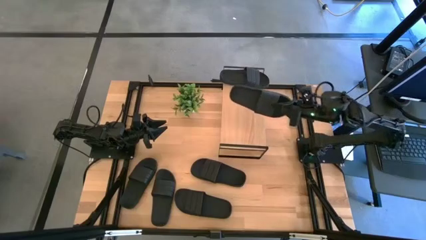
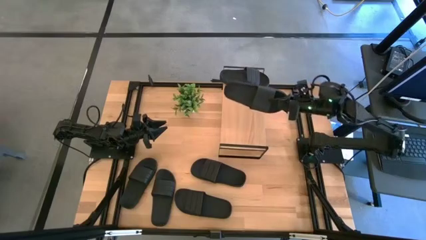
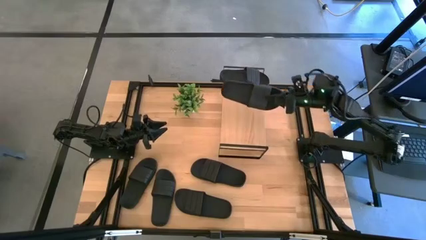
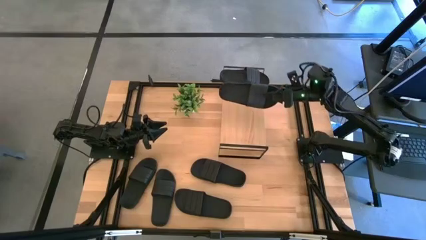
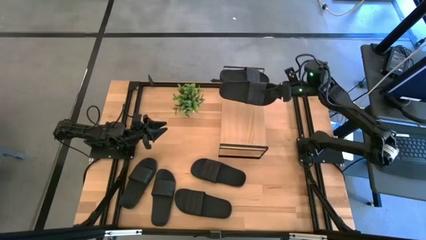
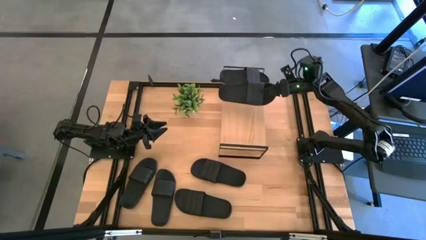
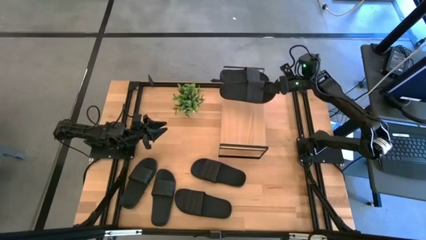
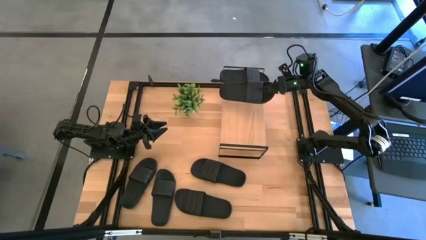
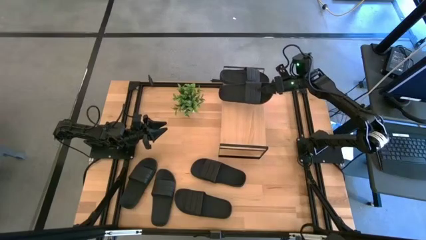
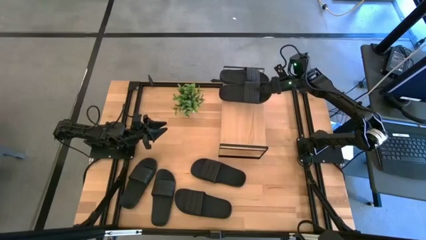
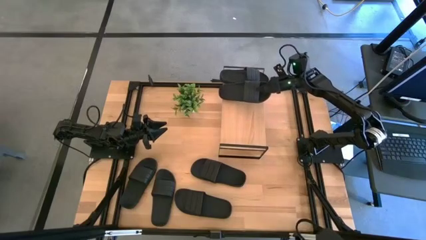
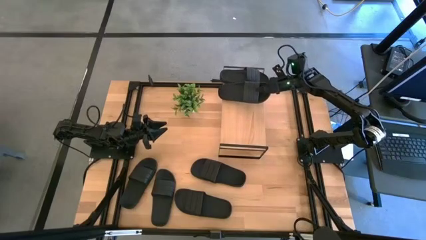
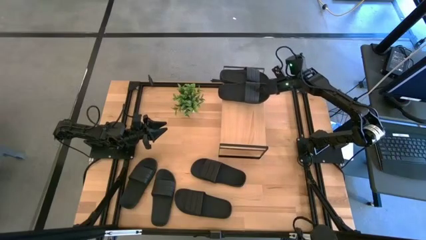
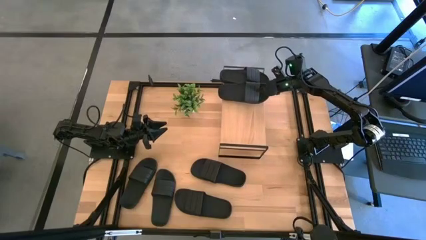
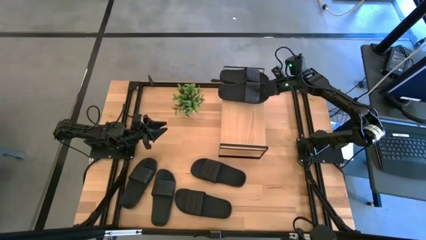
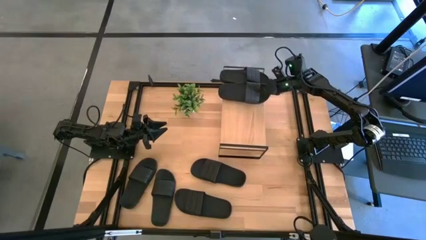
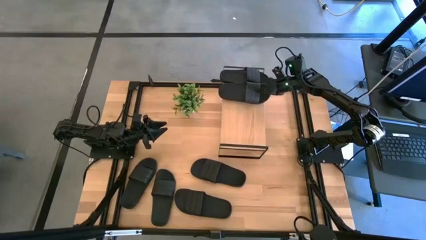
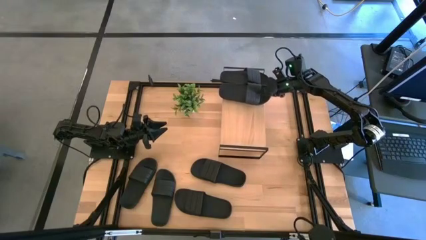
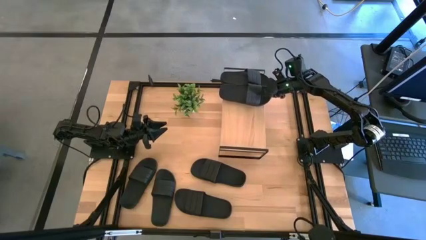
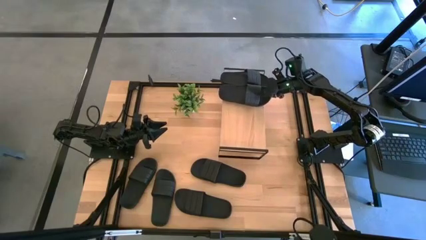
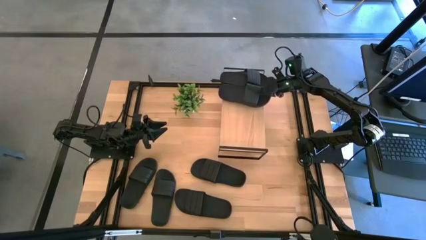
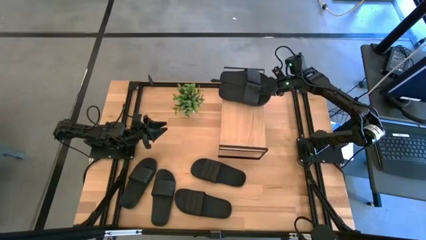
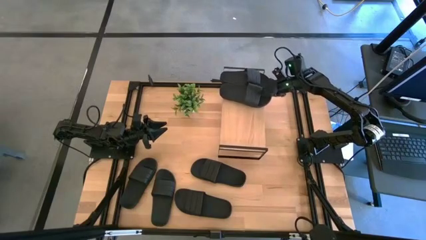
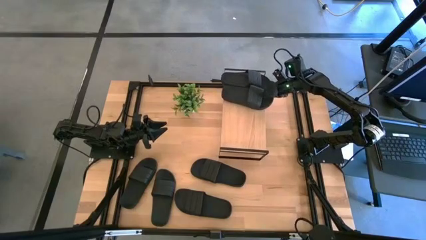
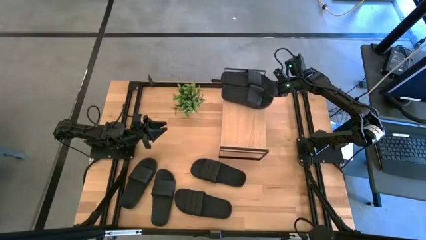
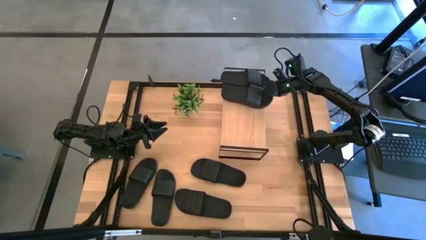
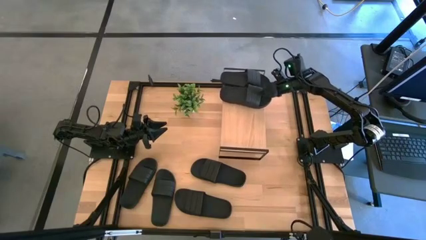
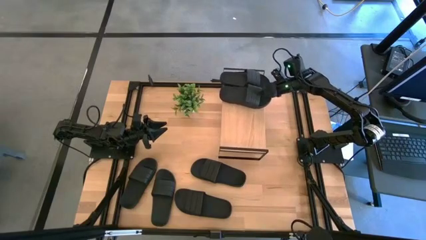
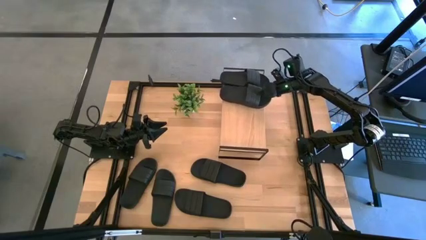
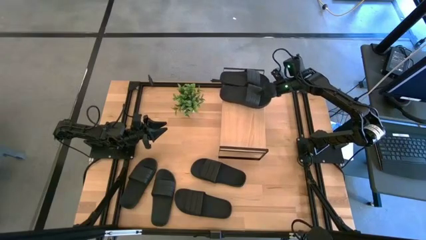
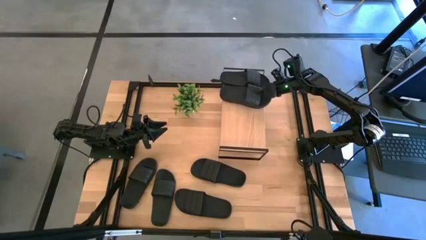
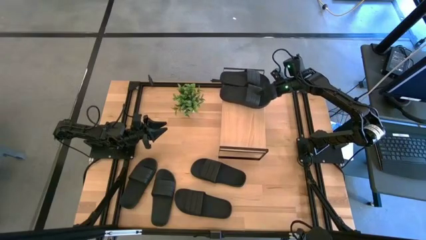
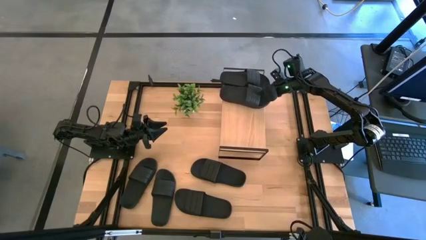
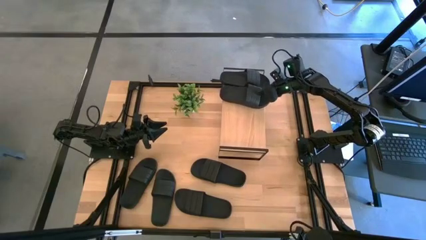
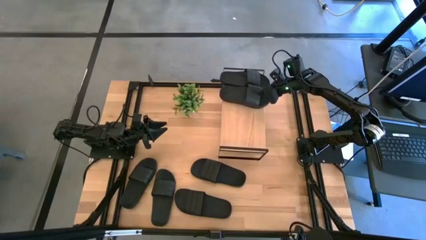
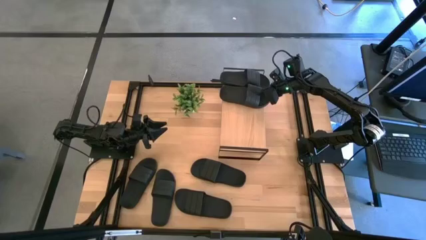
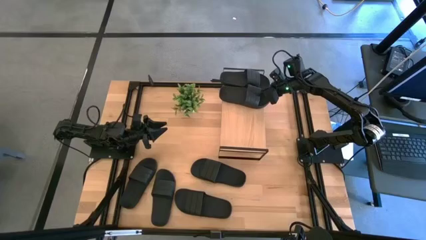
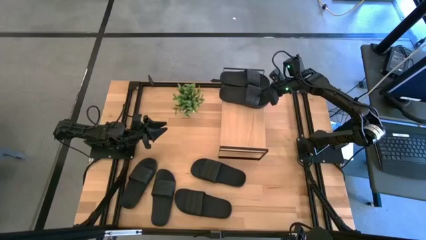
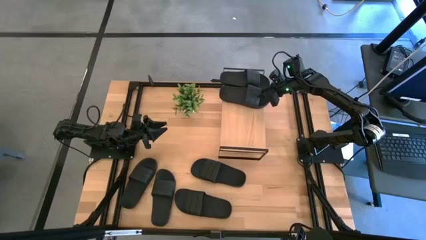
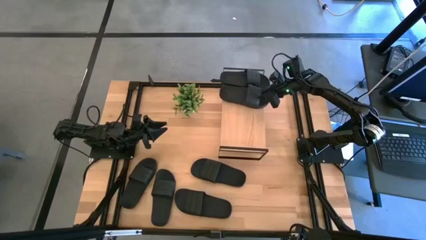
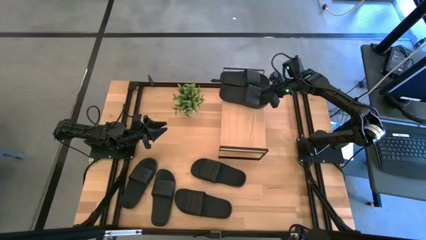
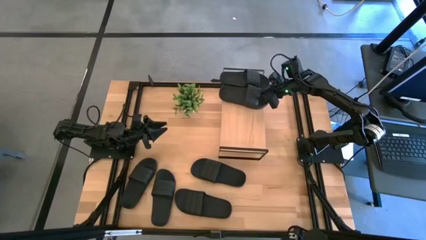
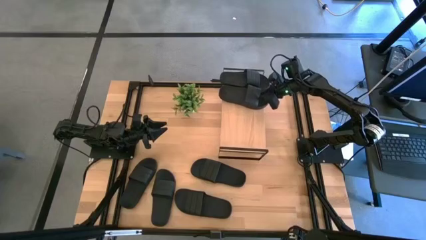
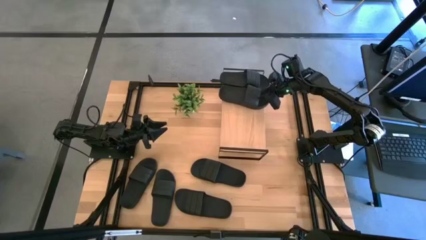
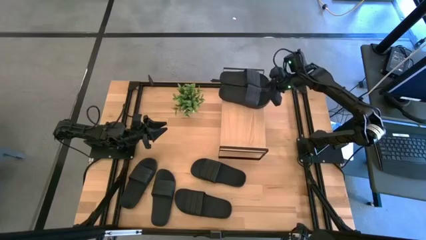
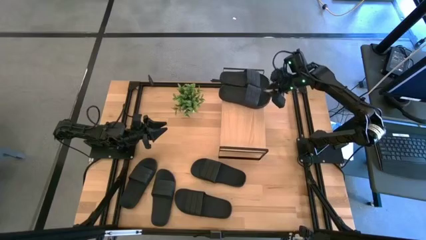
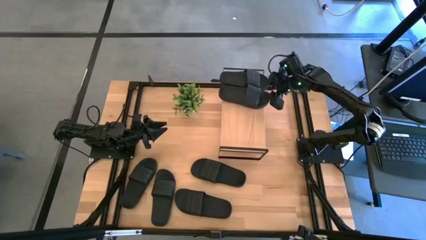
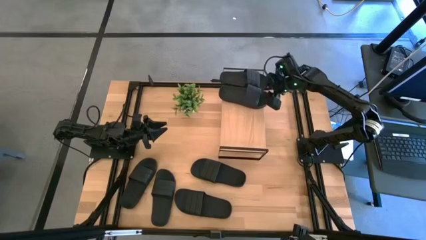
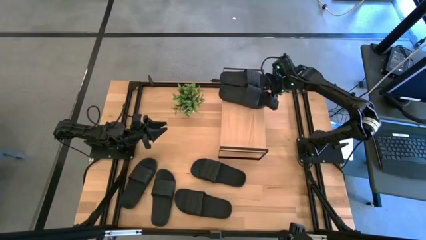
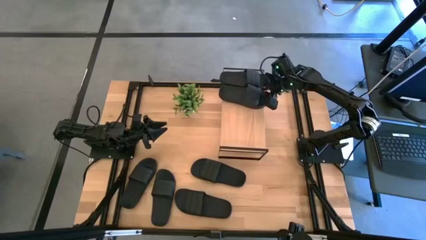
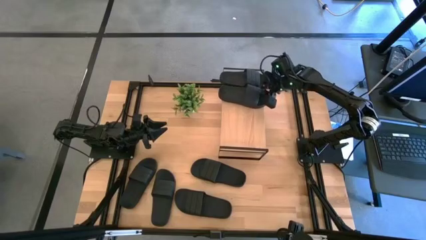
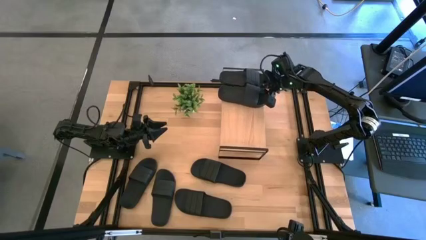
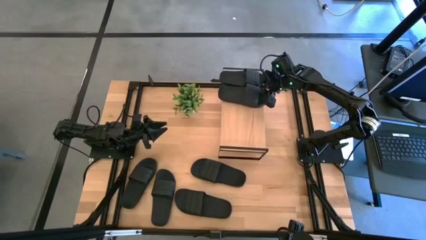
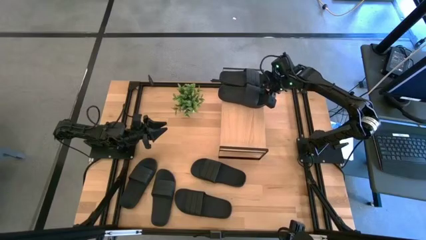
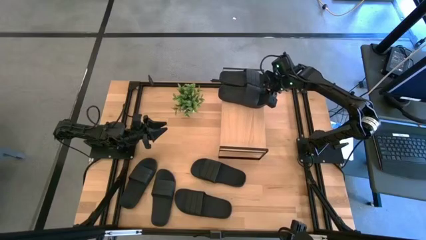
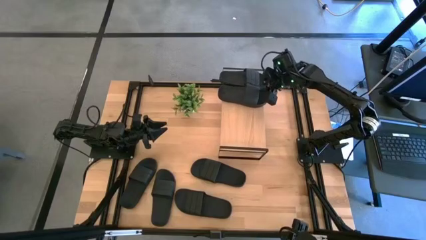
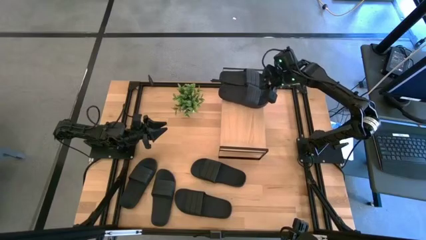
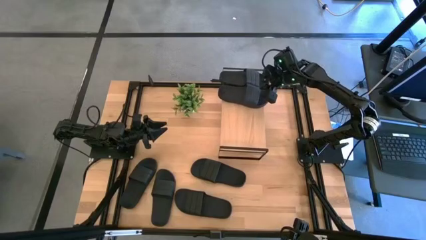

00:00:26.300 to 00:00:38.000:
Task: Pick and place slides into the shelf
Put the black slide on the shelf
